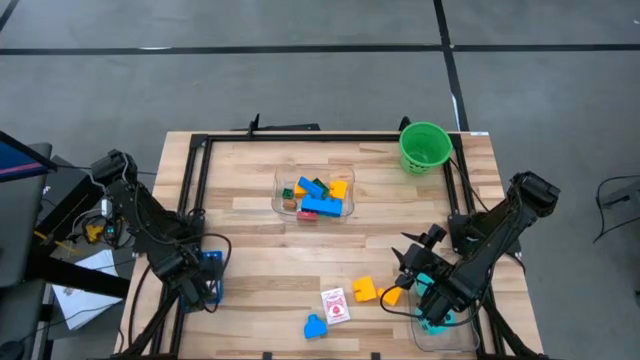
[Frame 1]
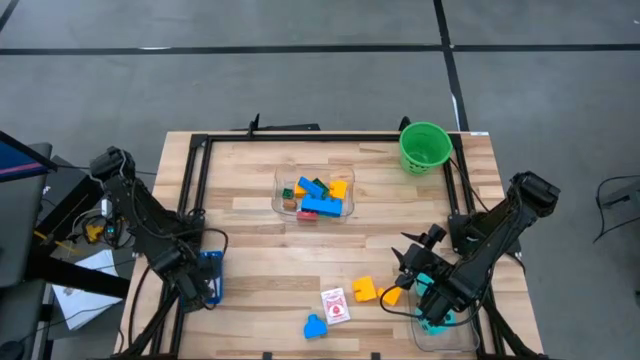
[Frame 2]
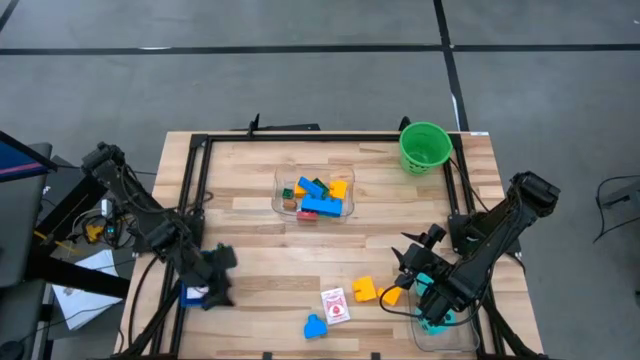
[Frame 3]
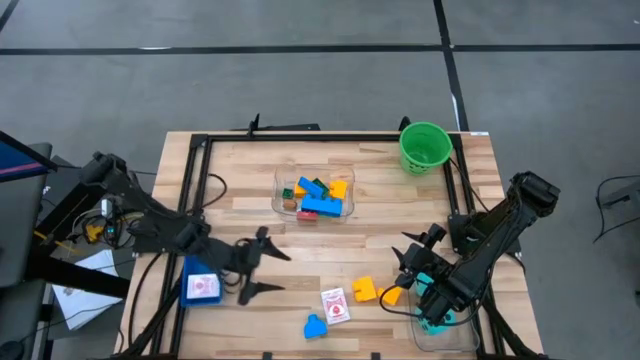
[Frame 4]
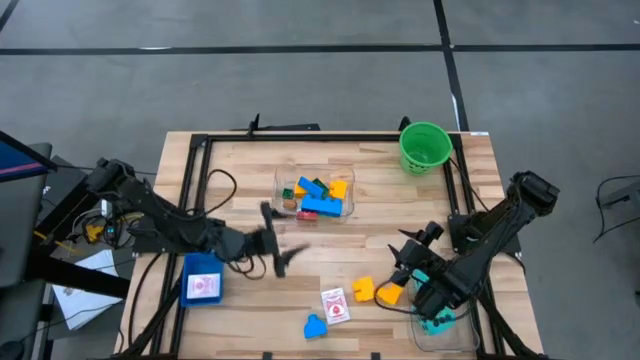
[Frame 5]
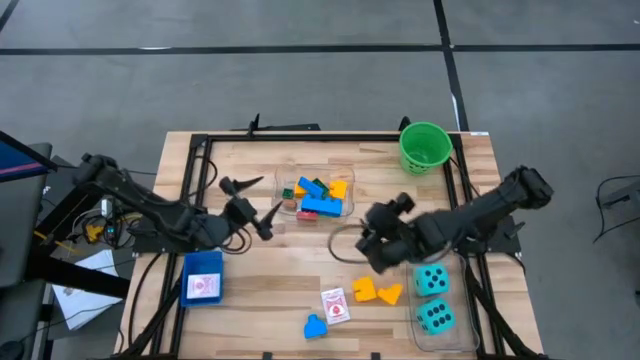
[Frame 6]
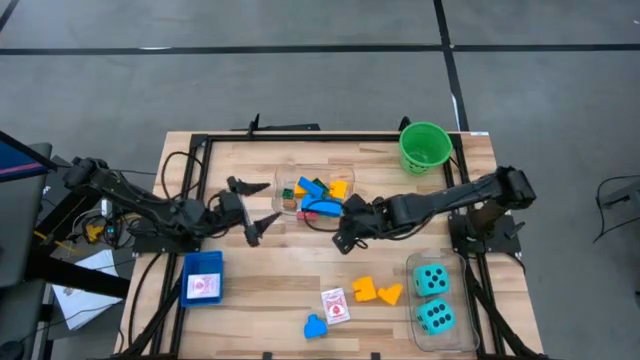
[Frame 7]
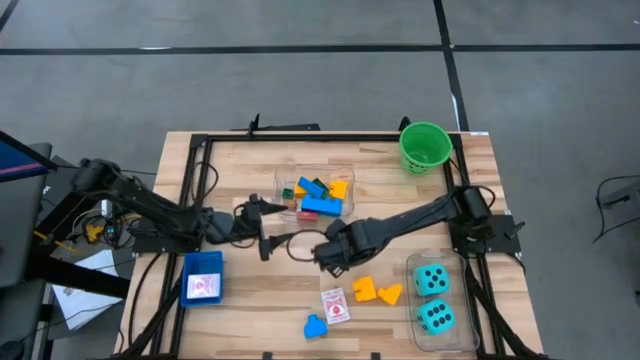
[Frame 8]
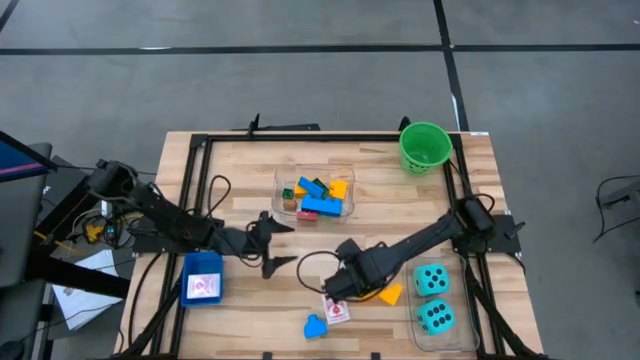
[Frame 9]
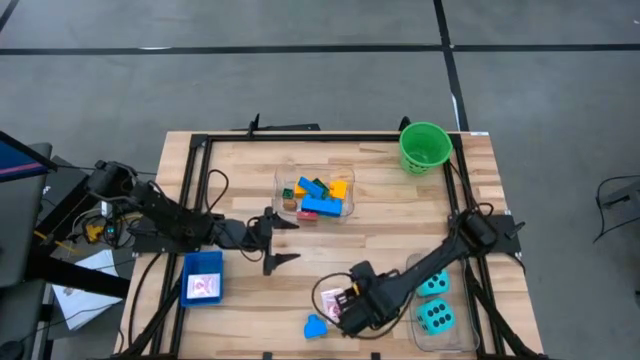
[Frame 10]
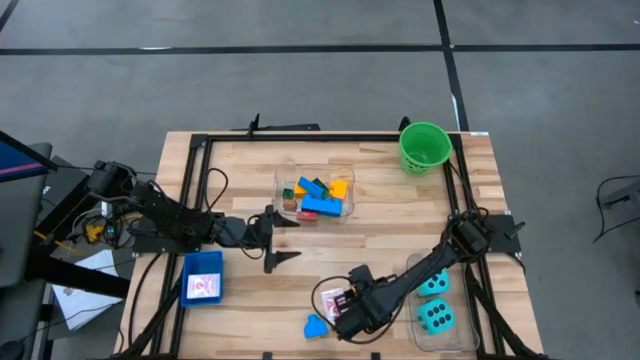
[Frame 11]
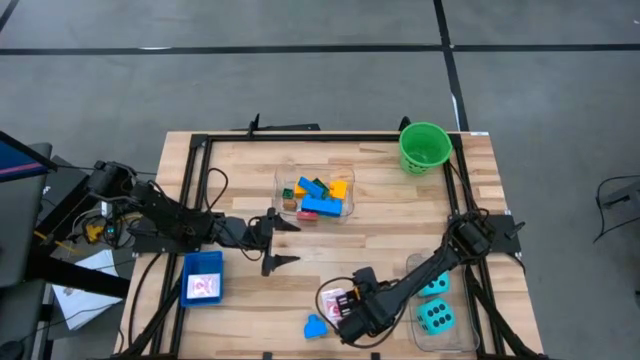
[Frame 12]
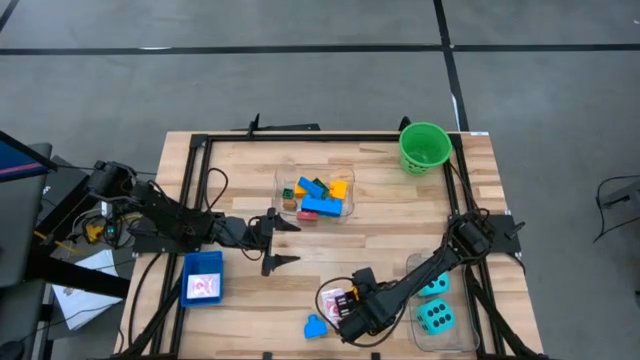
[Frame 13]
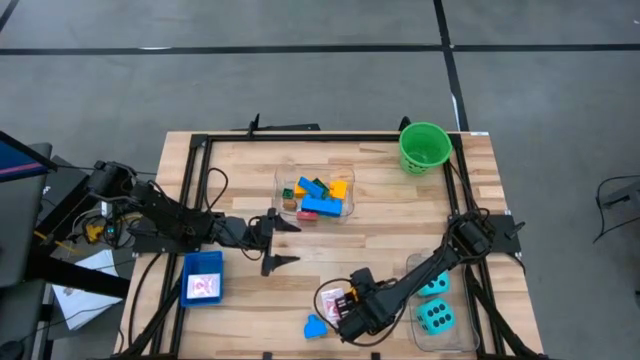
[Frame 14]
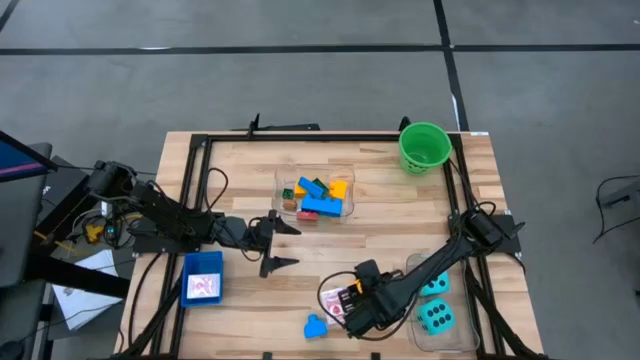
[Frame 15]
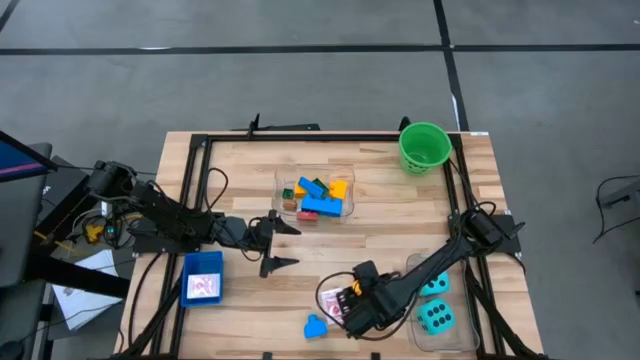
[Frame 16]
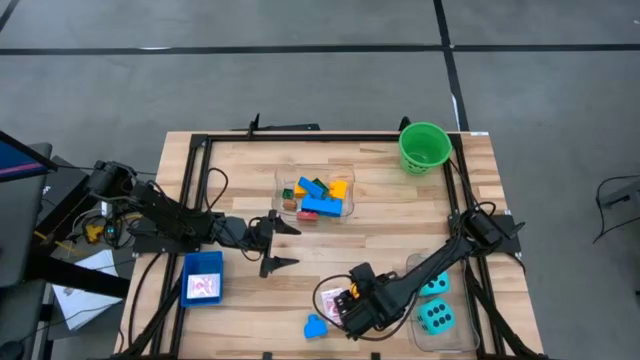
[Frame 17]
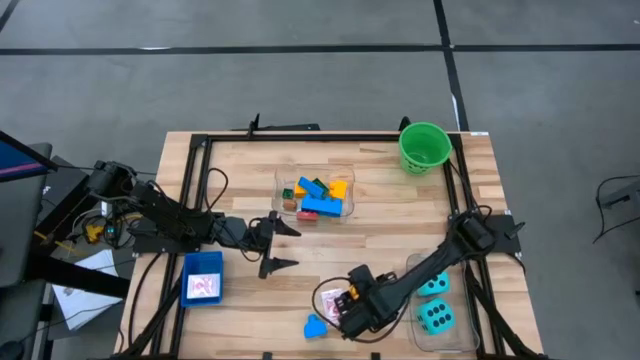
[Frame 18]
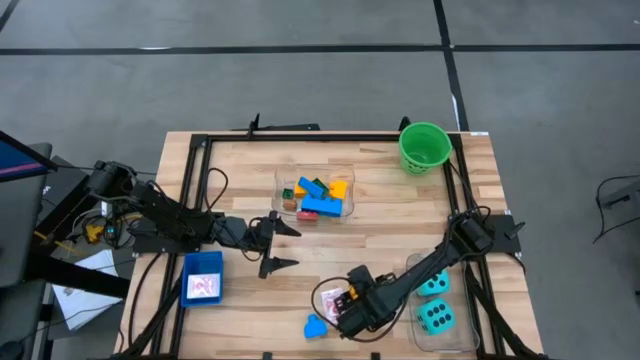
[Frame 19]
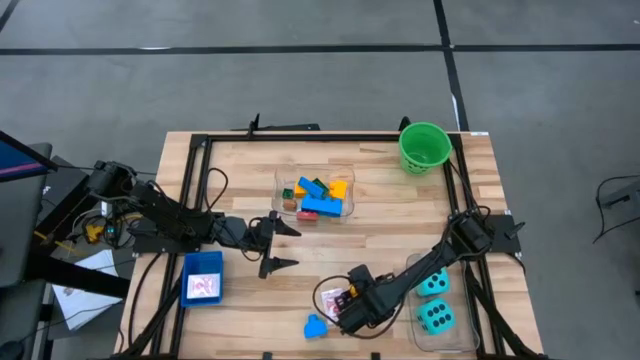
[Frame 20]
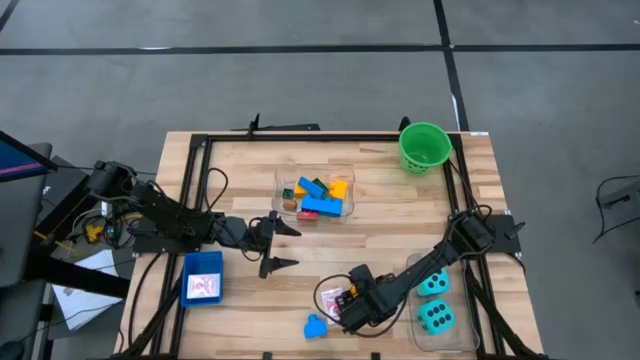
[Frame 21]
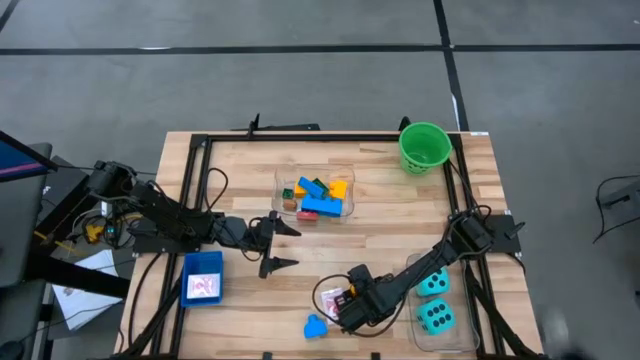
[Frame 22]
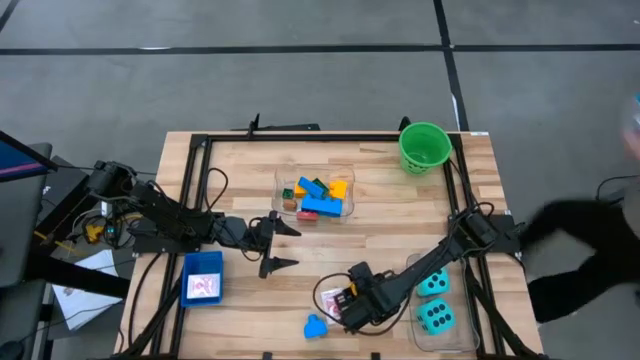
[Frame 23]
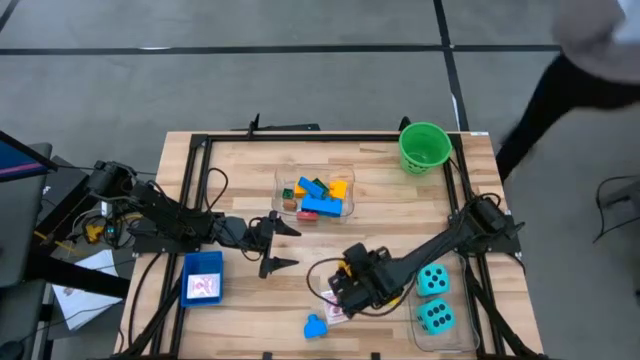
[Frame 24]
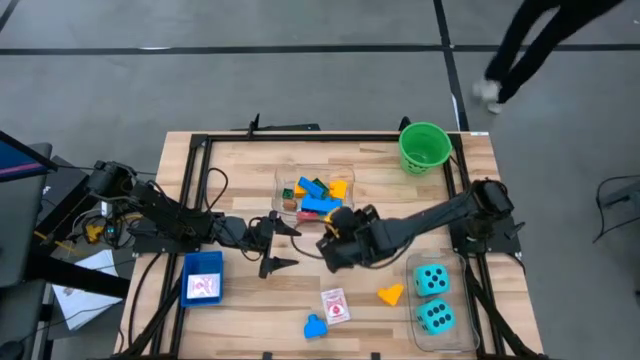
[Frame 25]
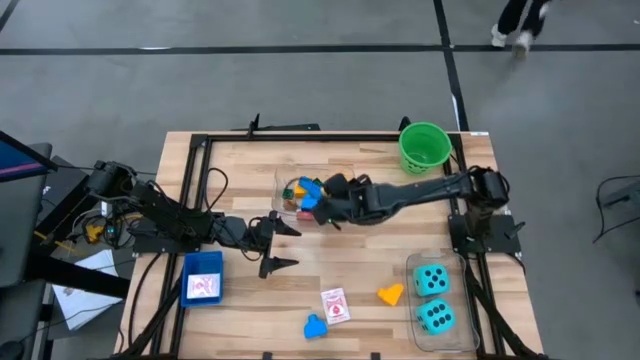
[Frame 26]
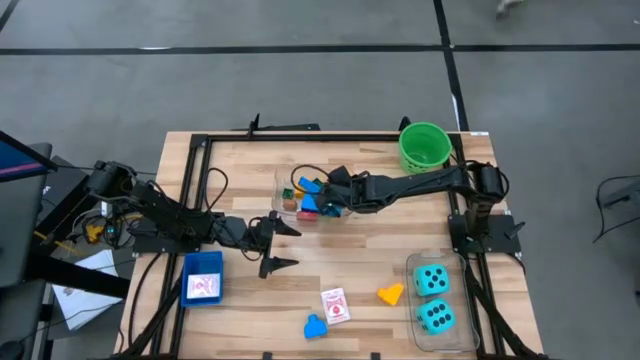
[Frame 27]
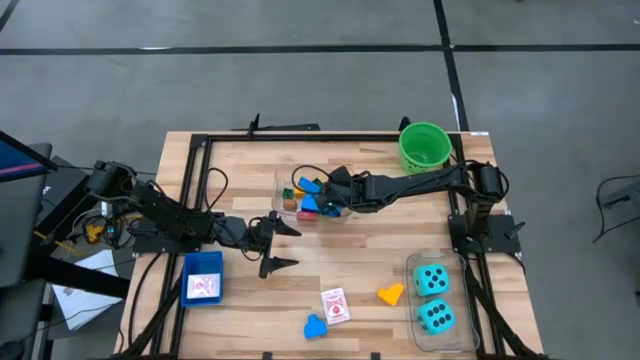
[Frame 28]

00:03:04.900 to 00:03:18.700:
Task: Pick & Place Toys
Put the yellow game piece into the top transparent bin

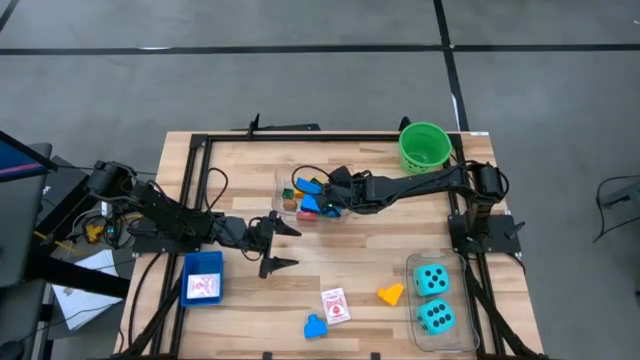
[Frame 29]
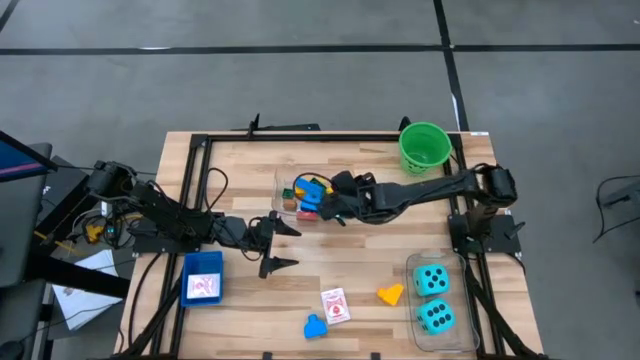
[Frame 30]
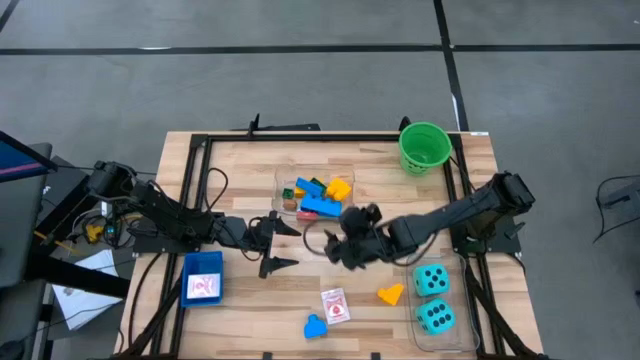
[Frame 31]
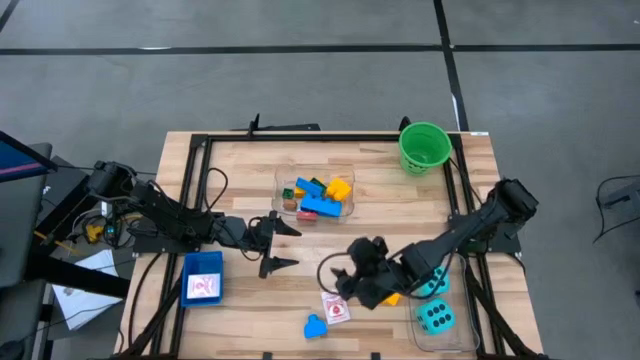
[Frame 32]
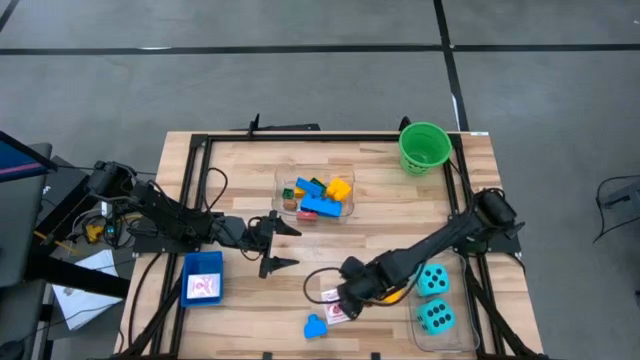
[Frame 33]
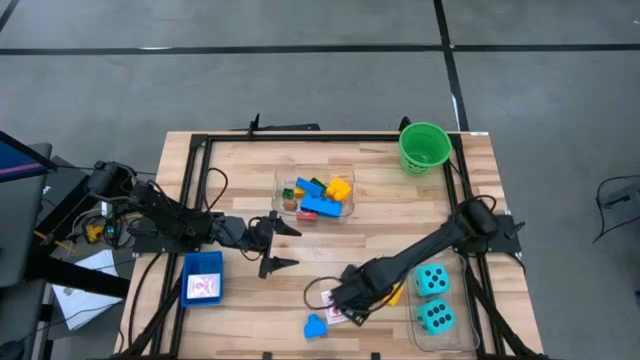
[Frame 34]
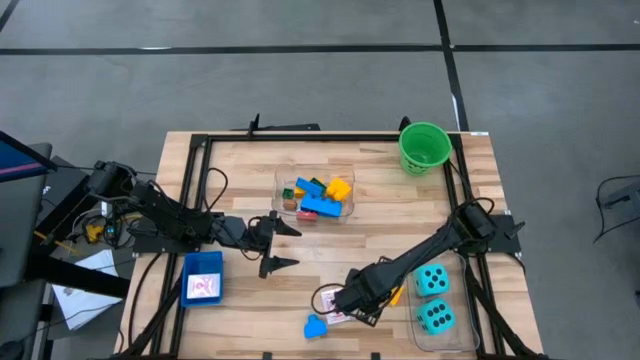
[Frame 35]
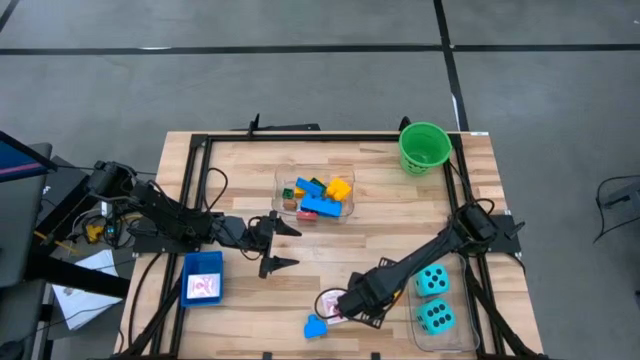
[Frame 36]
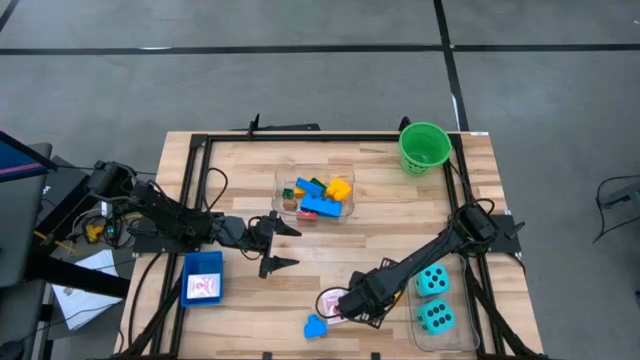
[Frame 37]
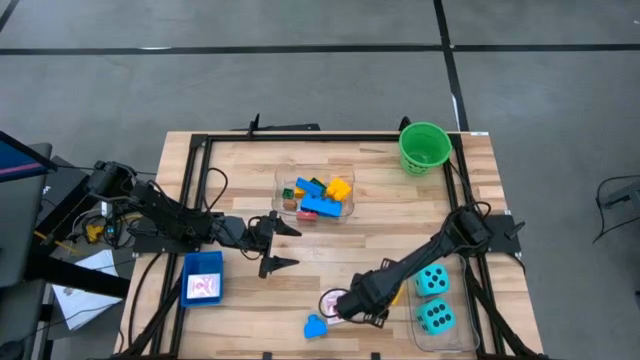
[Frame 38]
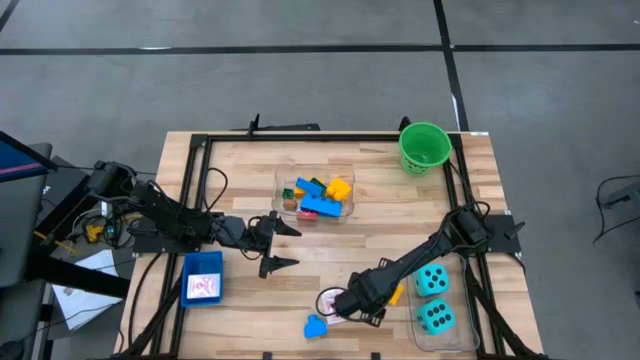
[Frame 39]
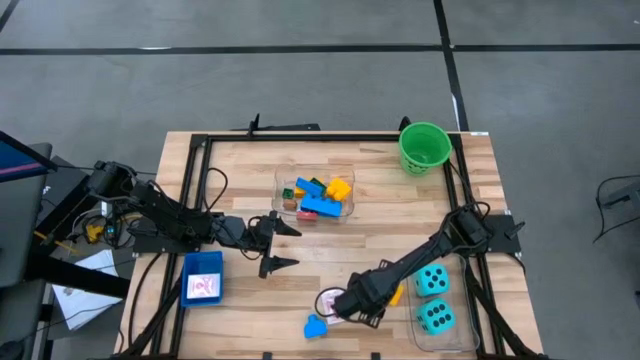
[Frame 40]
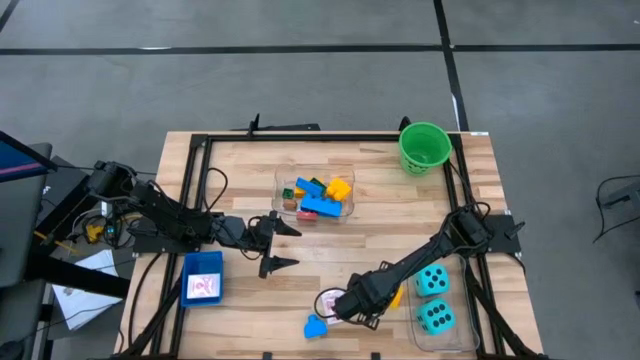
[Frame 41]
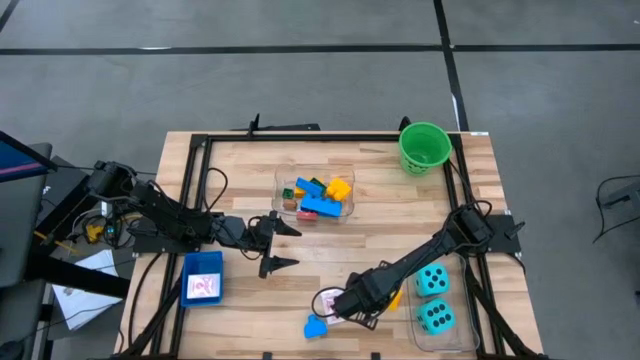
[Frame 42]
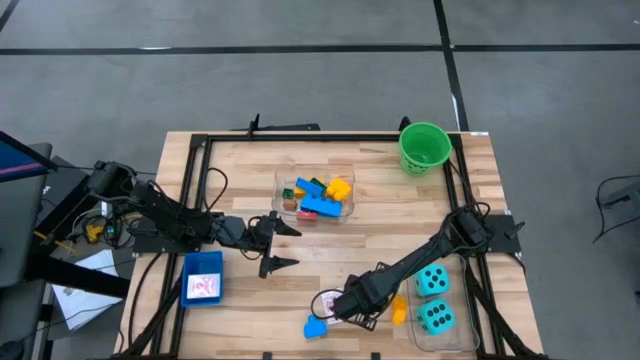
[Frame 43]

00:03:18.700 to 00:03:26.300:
Put the yellow game piece into the top transparent bin
